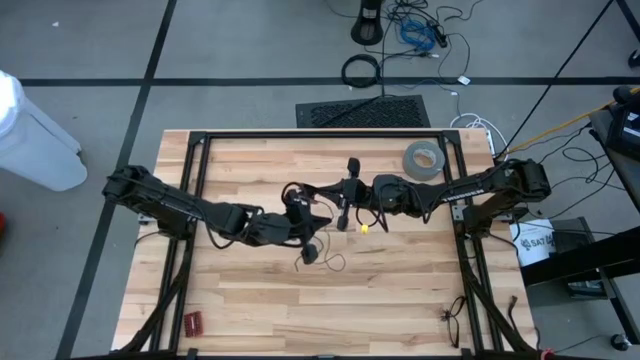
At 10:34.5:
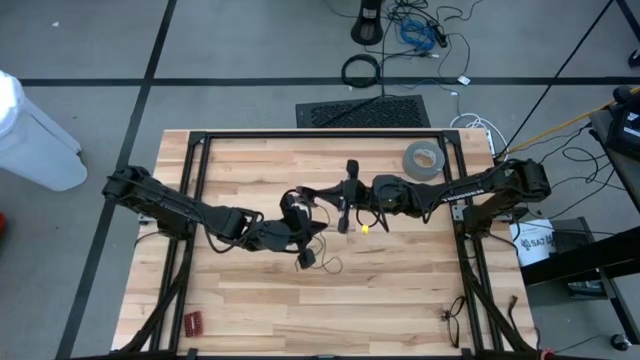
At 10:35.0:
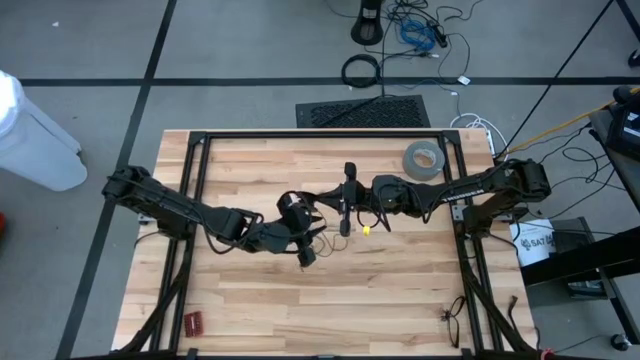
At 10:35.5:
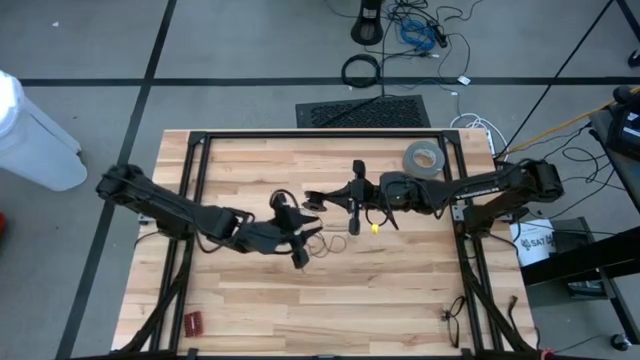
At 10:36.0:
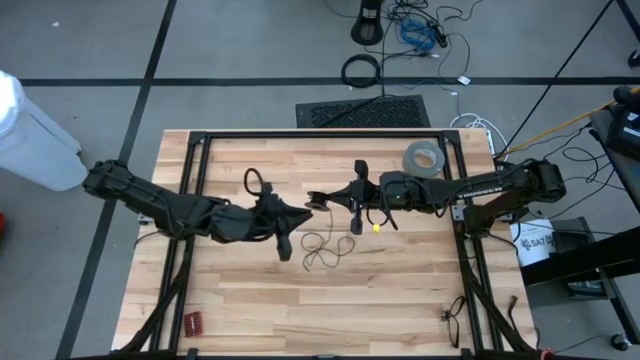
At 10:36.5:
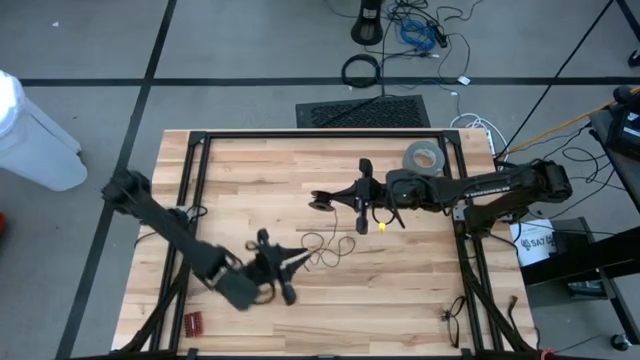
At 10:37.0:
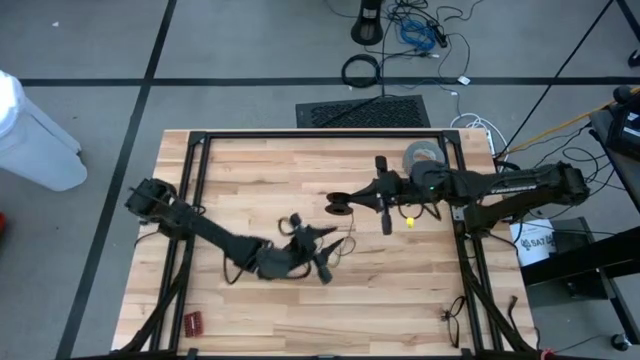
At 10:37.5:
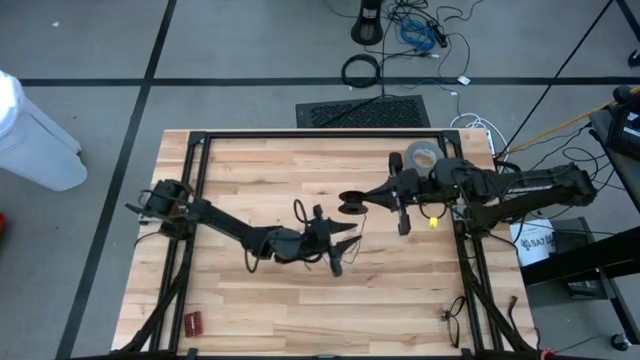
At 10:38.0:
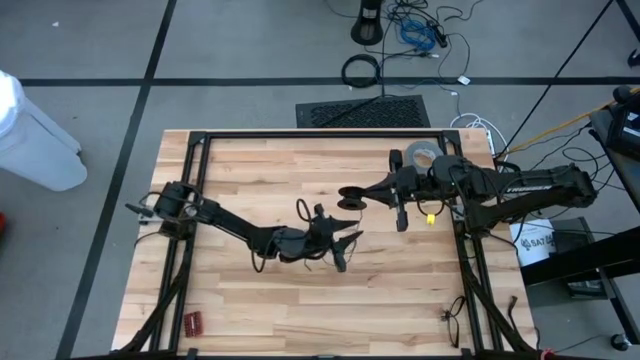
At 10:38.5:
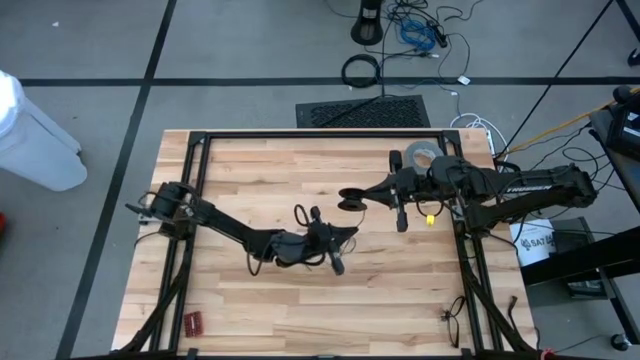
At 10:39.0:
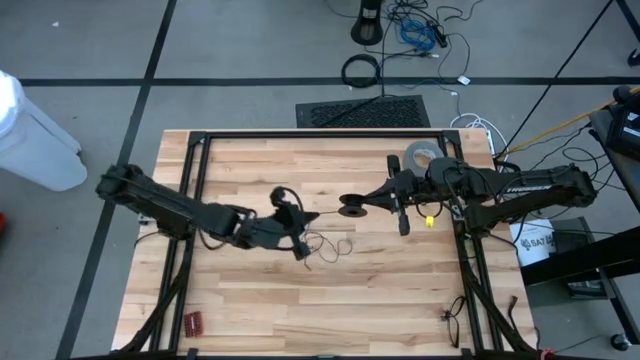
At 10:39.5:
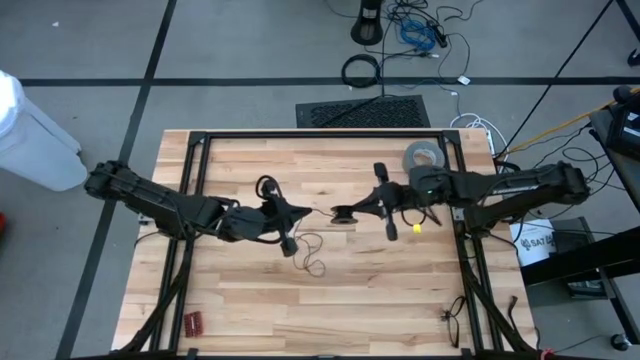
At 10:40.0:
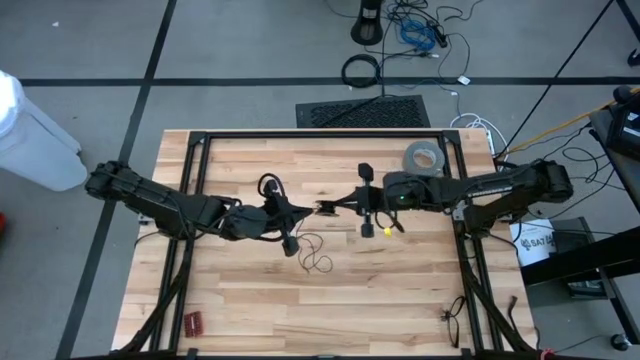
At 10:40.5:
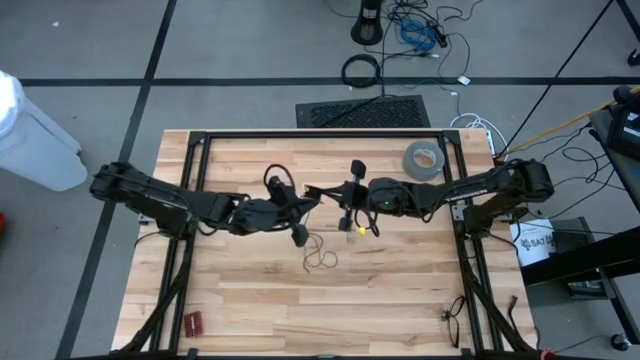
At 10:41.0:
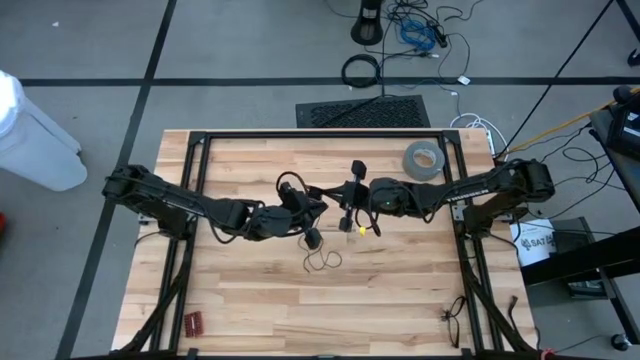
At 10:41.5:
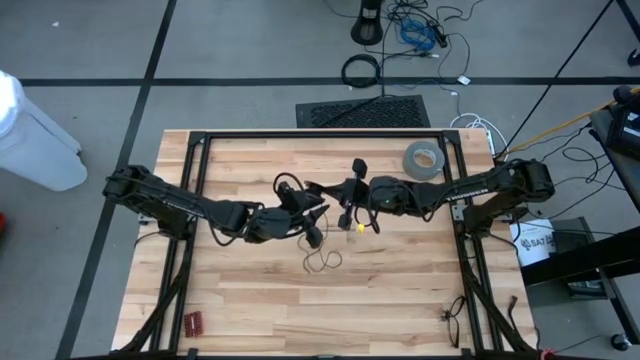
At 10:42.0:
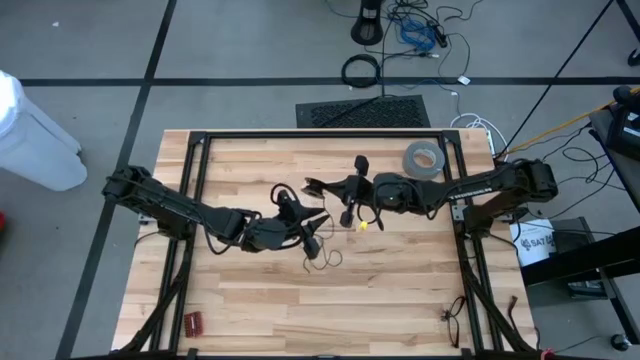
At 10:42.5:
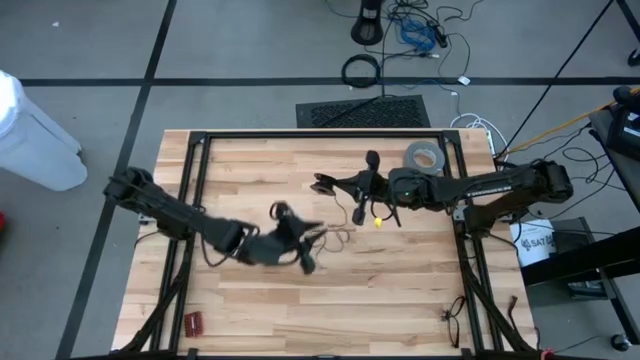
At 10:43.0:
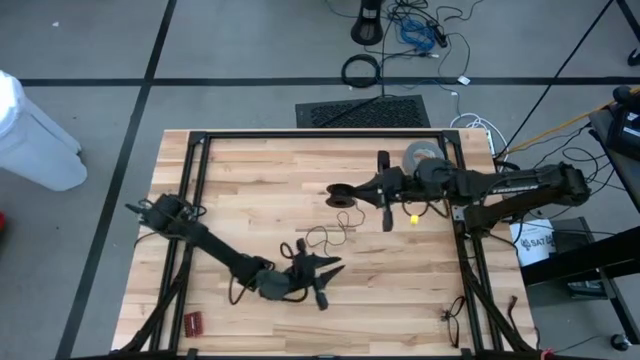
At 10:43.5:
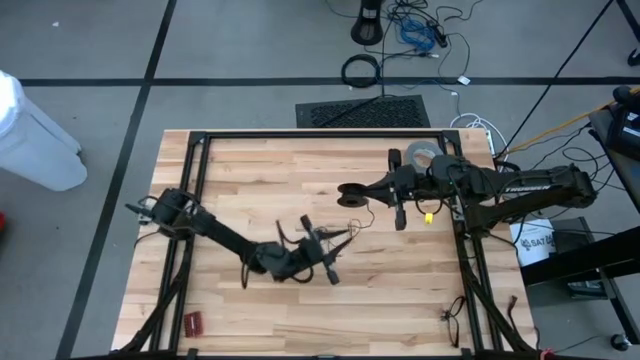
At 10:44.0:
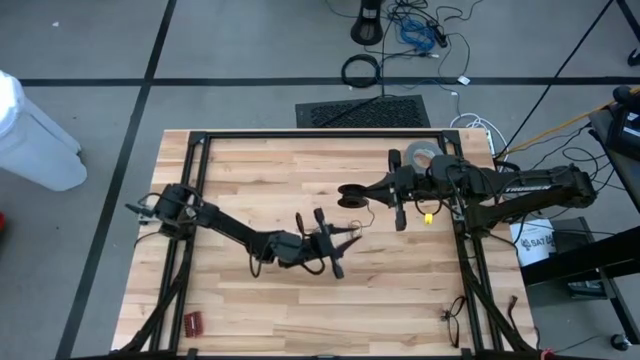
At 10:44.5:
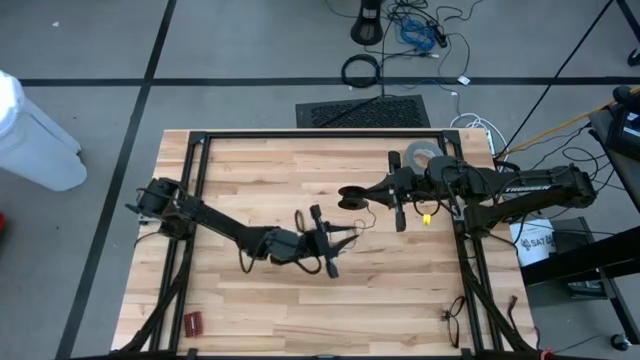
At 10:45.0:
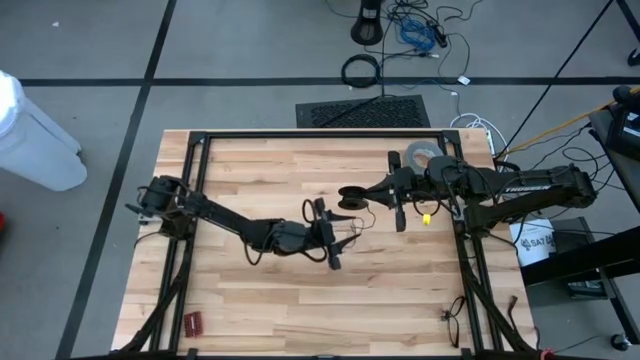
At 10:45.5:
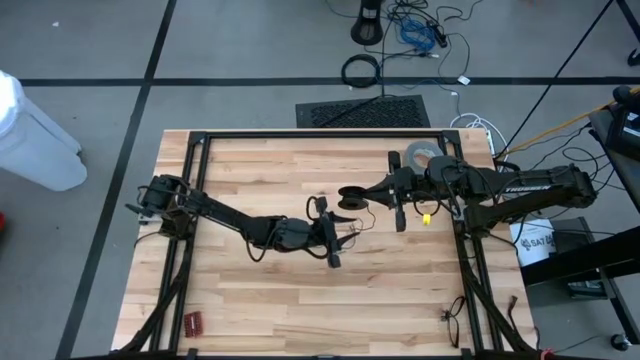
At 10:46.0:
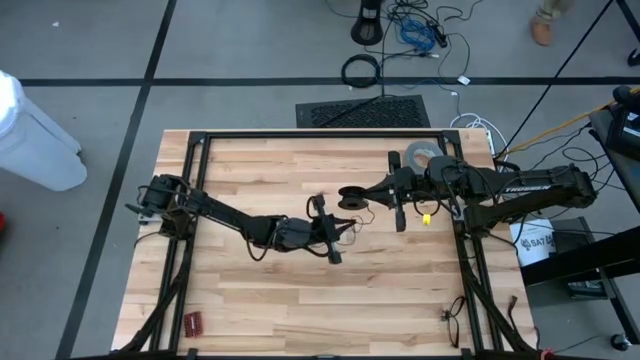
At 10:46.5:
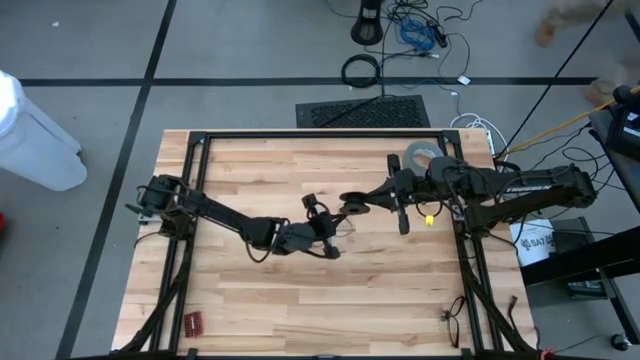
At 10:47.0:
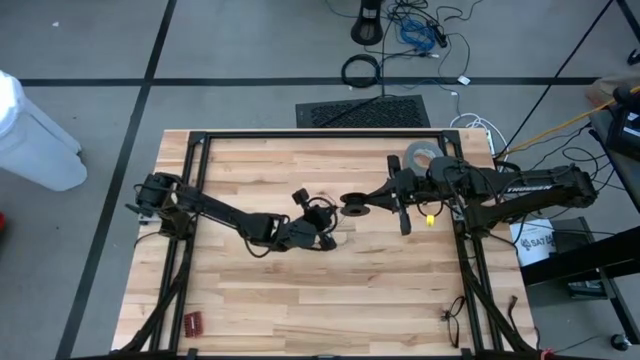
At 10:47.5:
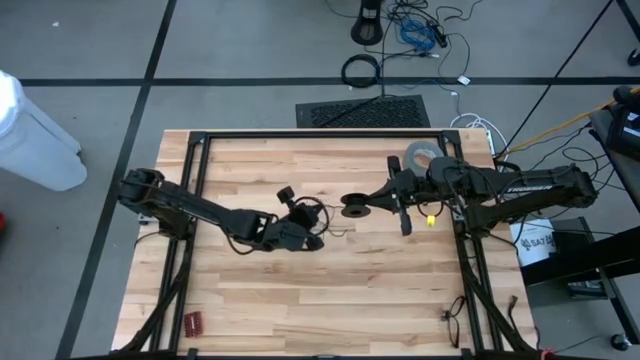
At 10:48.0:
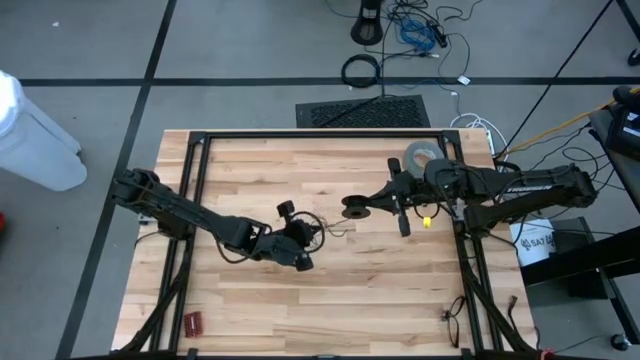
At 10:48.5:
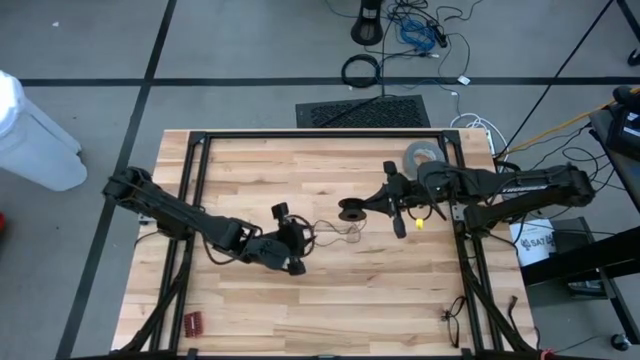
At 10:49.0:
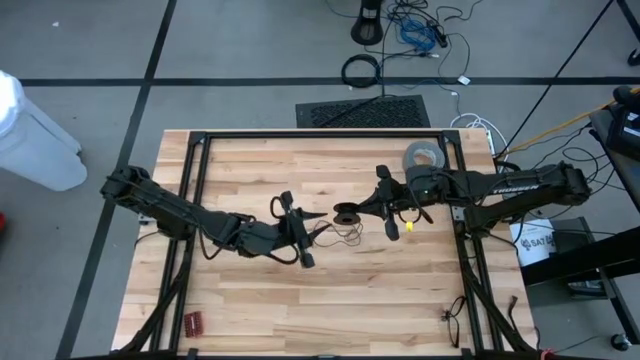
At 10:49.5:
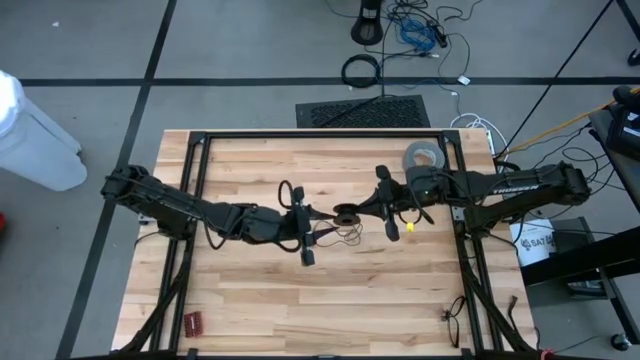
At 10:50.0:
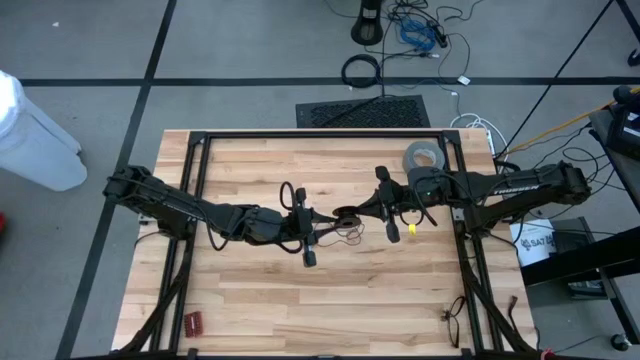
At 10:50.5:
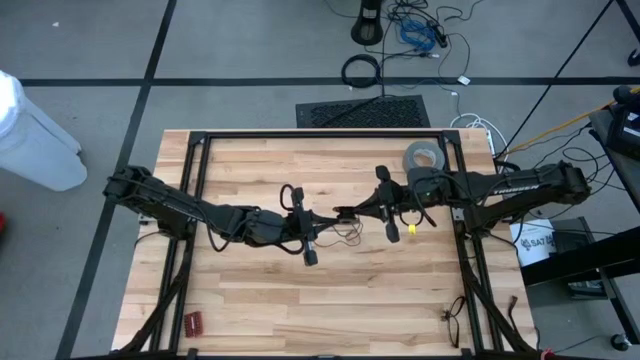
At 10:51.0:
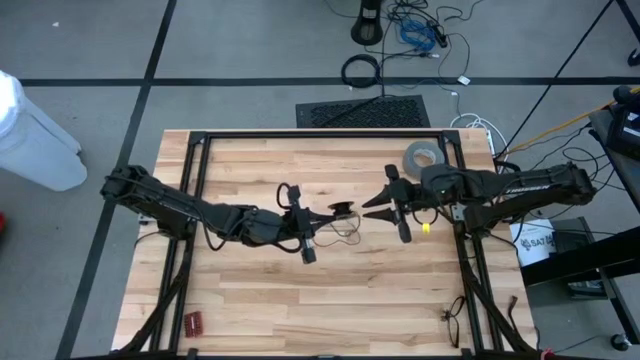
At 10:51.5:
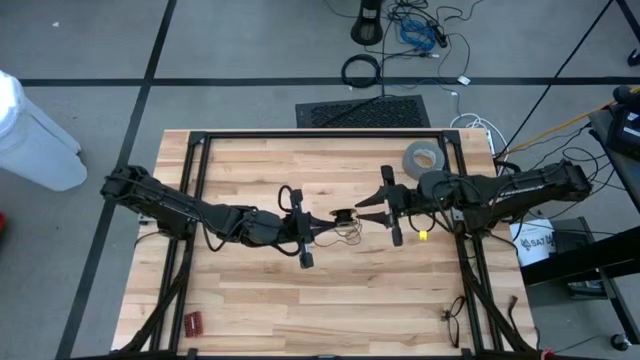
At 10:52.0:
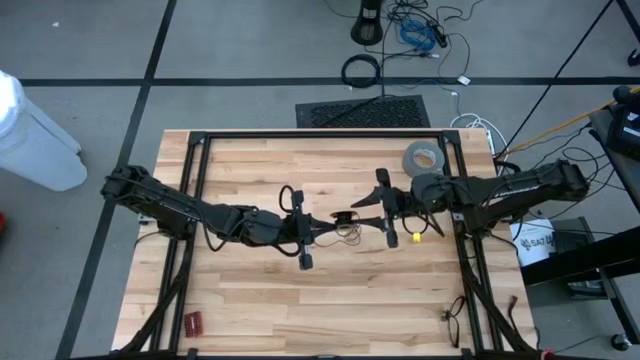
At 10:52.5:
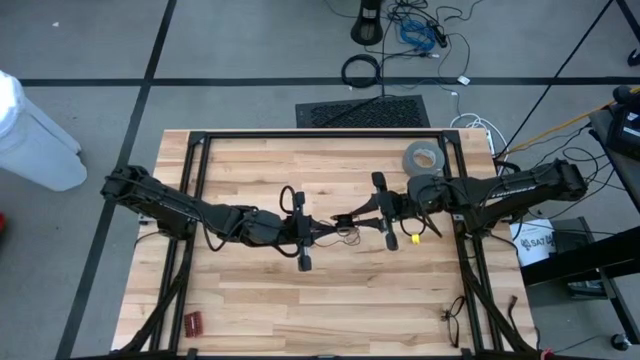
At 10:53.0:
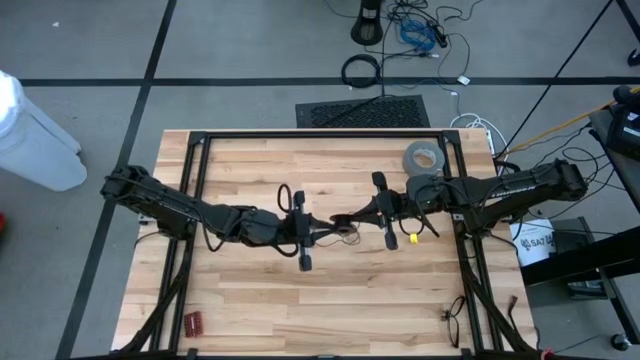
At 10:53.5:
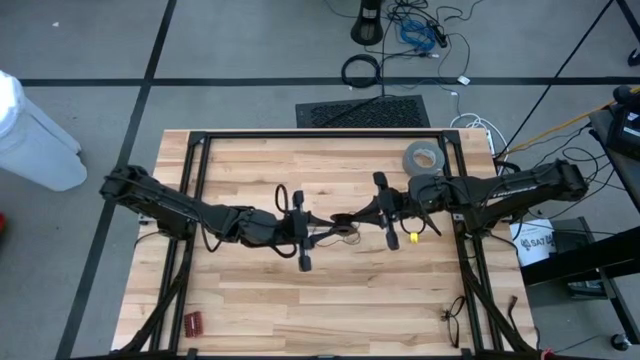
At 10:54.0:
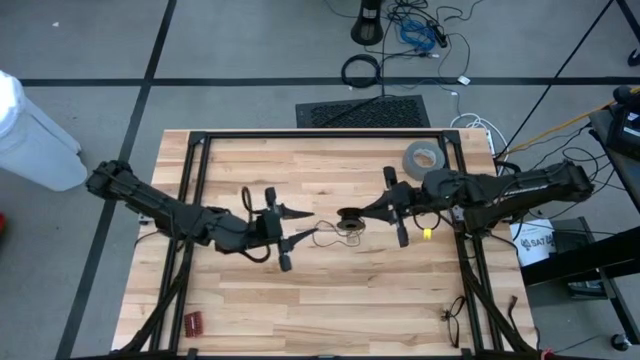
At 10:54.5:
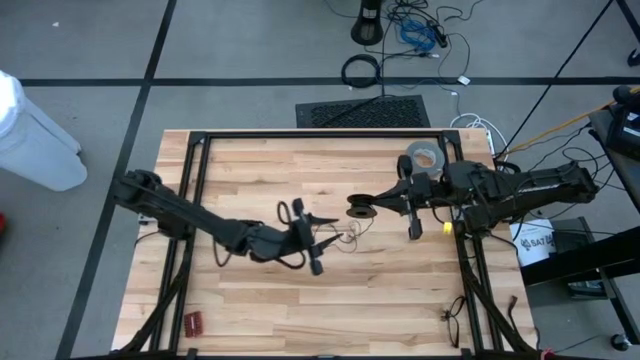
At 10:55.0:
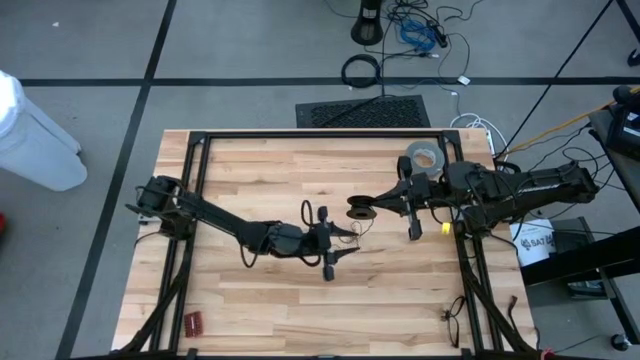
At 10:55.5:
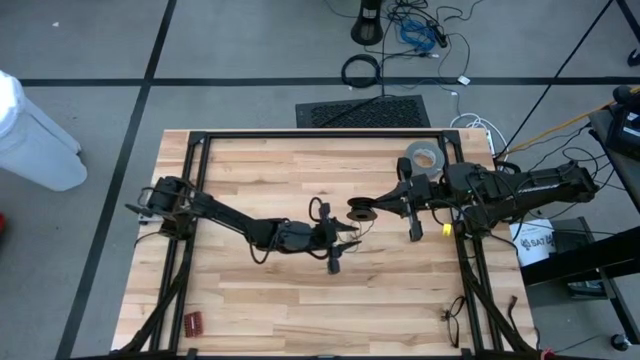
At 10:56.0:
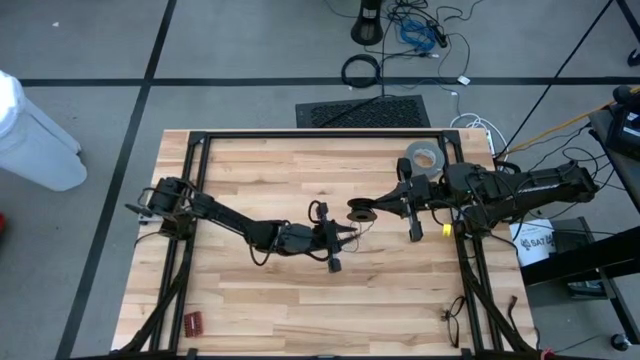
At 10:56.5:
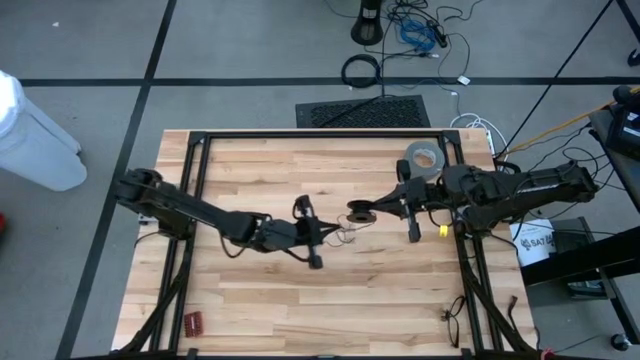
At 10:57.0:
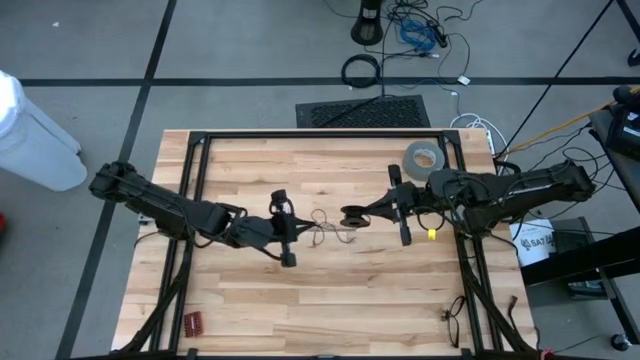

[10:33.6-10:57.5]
Task: Coil cords
Coil the black wire onto the spool
